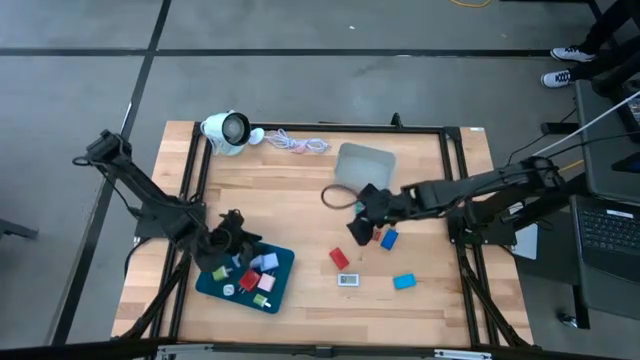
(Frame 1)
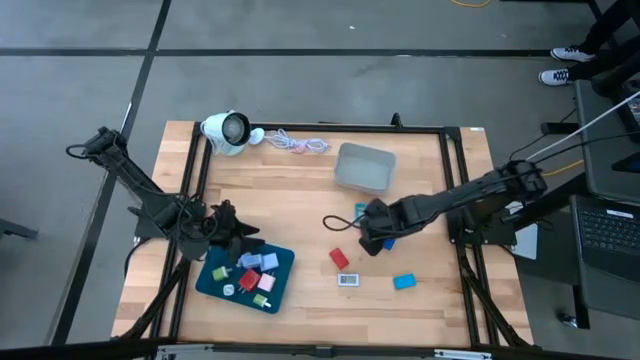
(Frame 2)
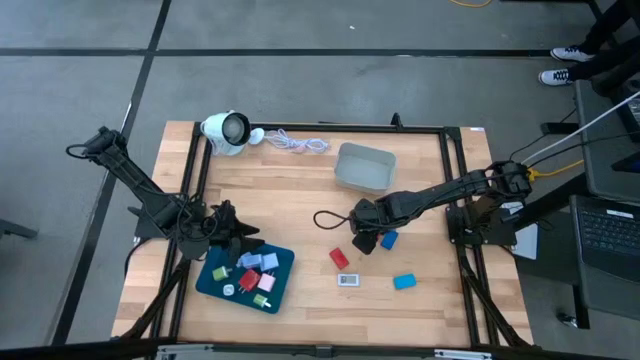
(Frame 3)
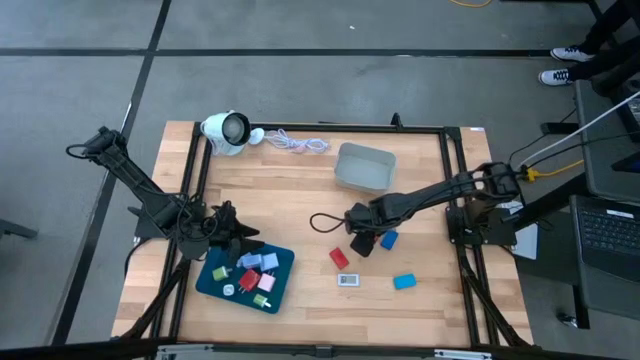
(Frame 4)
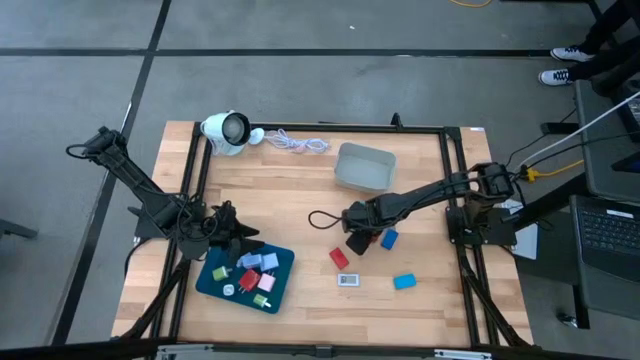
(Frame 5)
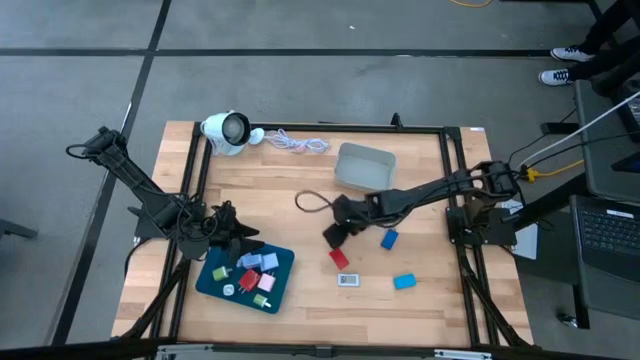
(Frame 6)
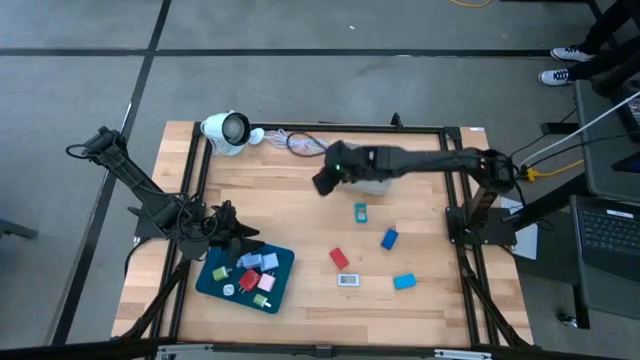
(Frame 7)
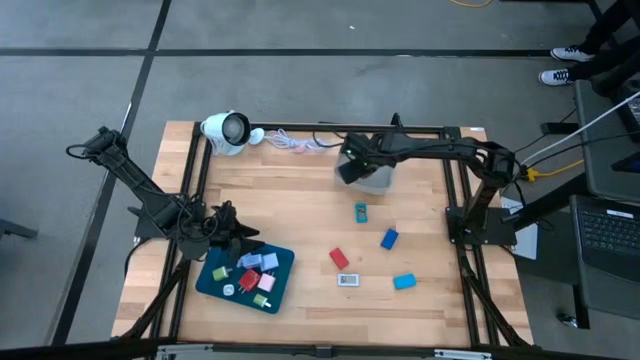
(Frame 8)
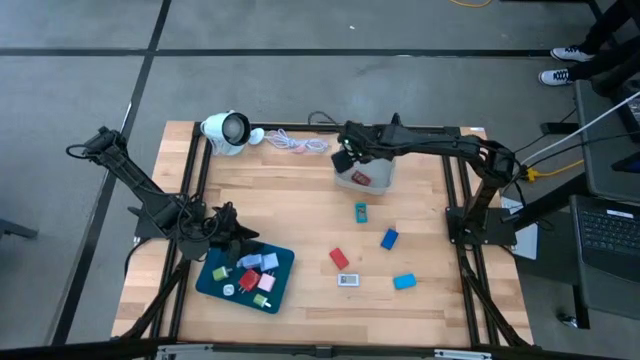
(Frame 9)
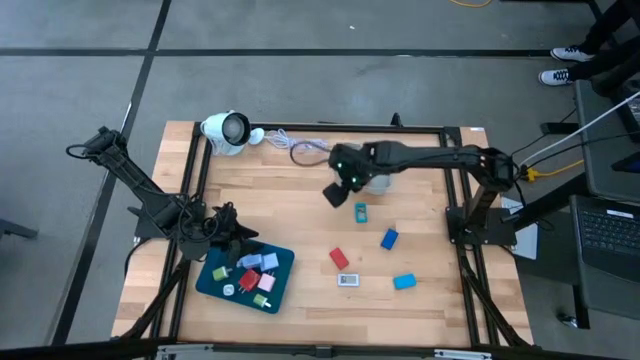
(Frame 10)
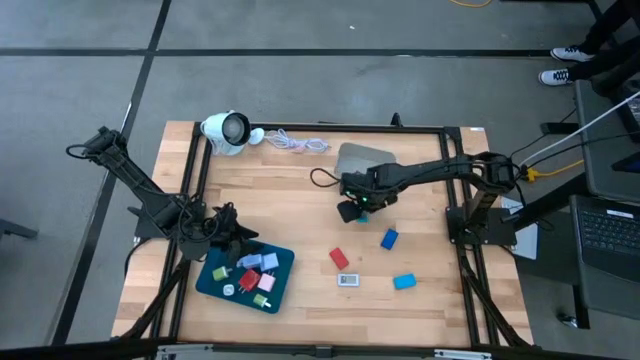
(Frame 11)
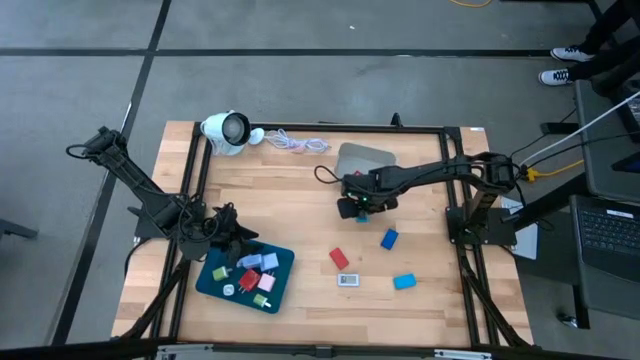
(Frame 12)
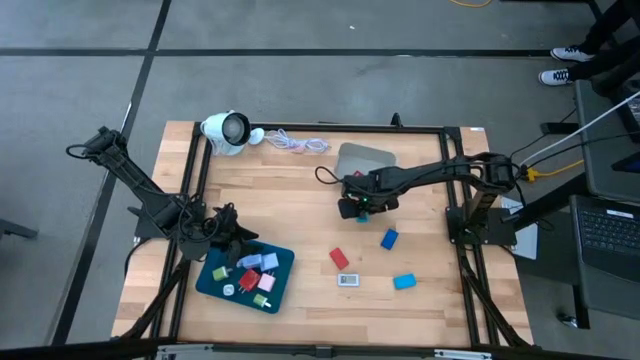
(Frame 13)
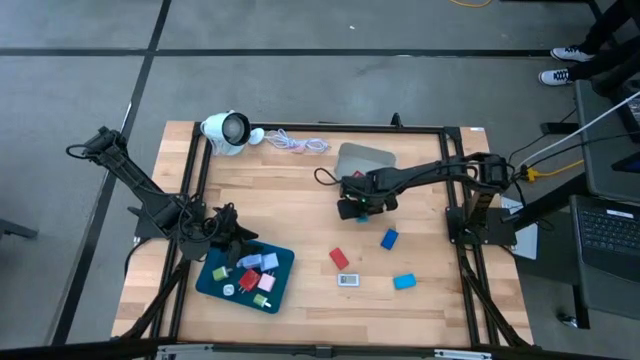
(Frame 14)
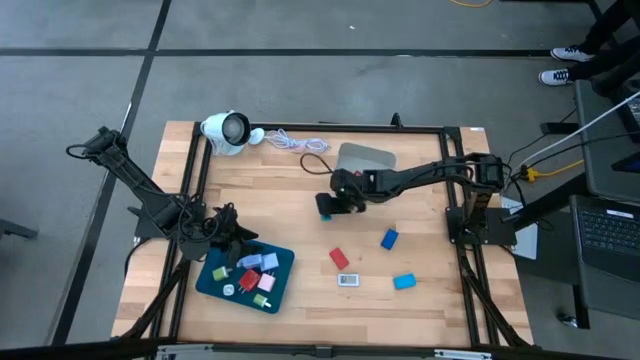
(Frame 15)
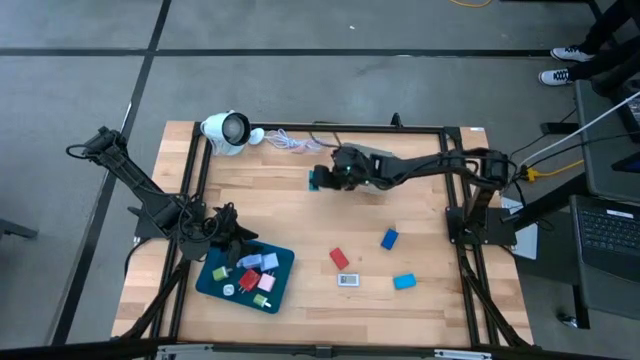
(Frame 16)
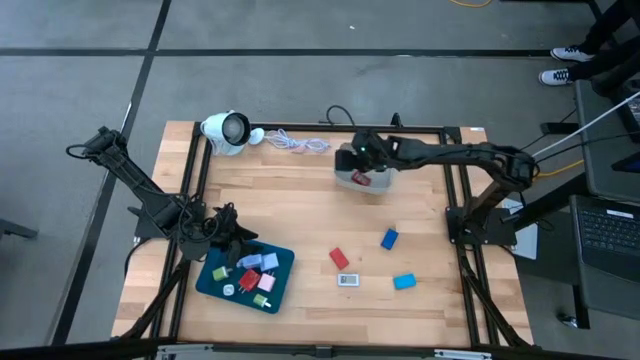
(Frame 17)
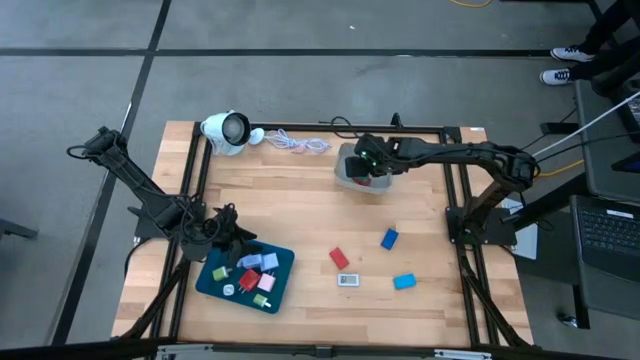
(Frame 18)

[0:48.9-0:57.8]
Task: Pick & Place Office items
Put the top red digital clock into the gray bin

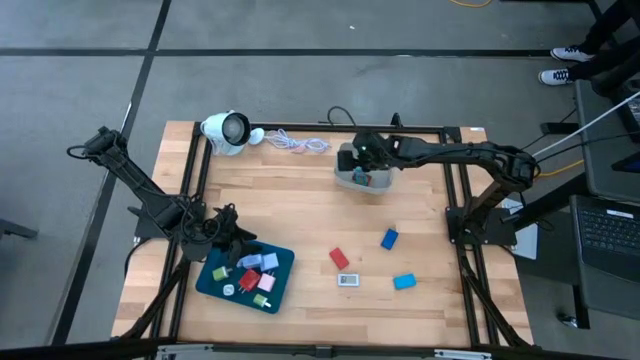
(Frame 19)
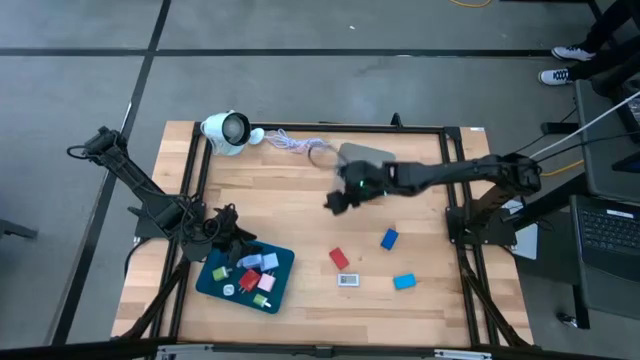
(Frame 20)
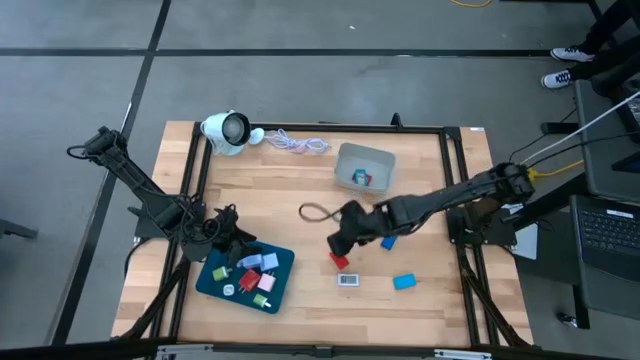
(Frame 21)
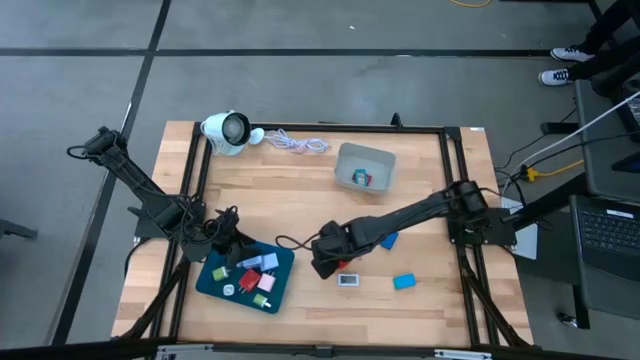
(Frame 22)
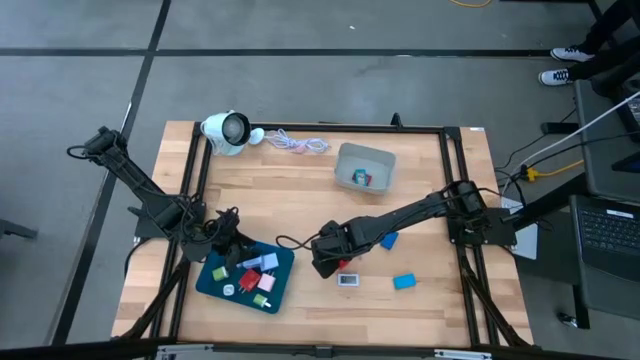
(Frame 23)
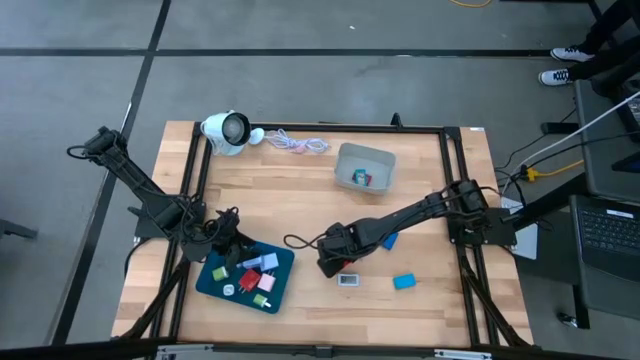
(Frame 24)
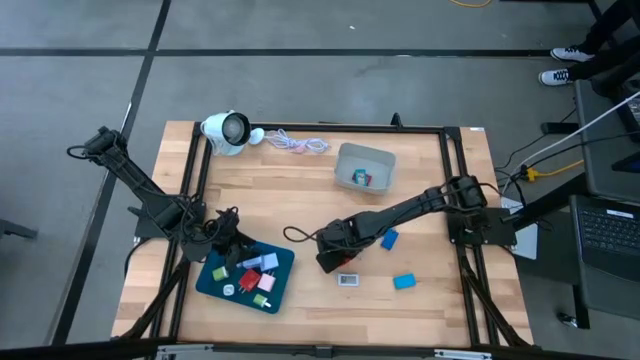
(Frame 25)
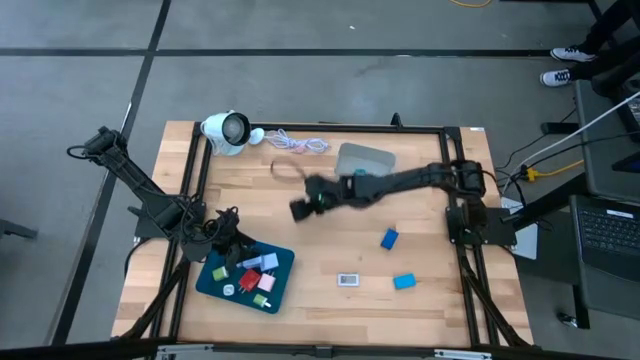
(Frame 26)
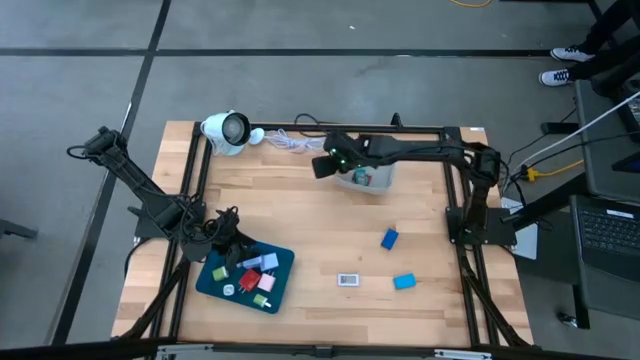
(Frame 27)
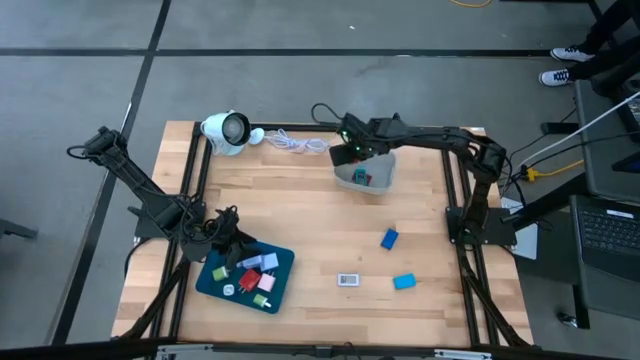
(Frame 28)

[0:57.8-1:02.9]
Put the red digital clock into the gray bin

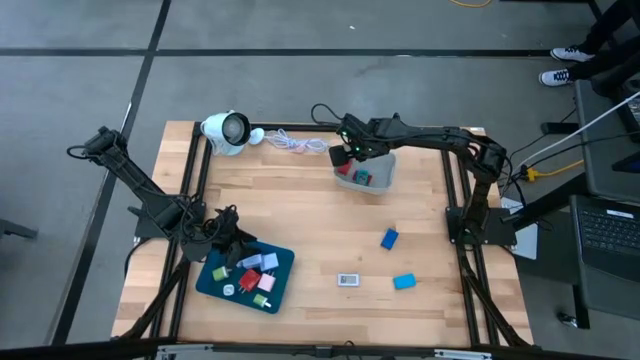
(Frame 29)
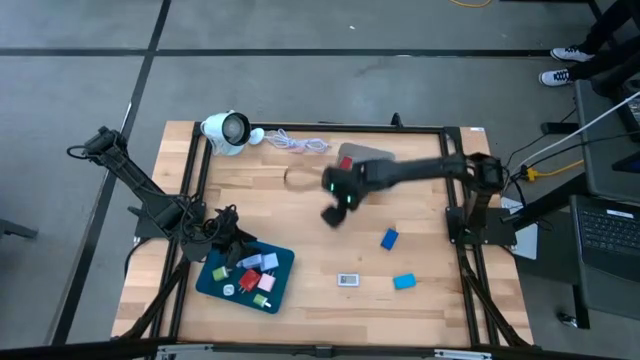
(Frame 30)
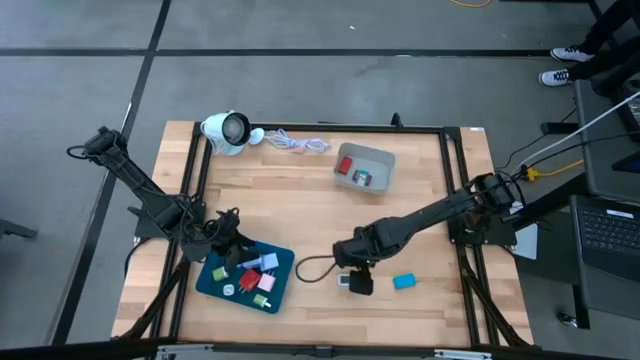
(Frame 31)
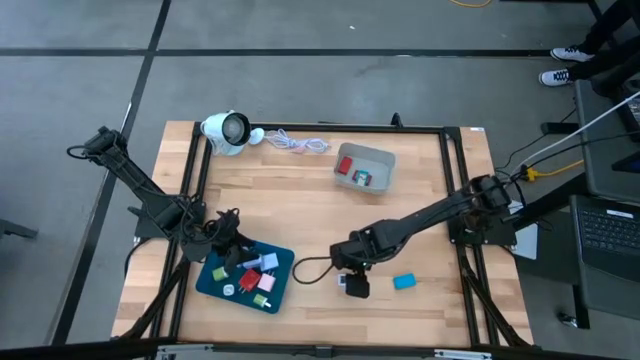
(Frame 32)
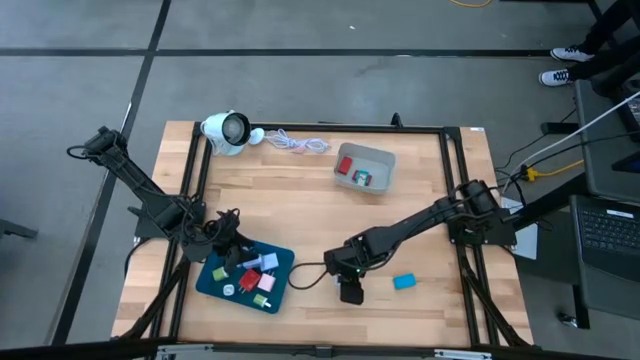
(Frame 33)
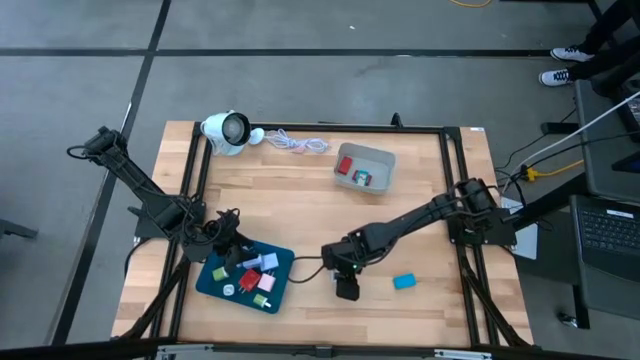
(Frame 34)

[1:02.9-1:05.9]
Put the white digital clock into the gray bin

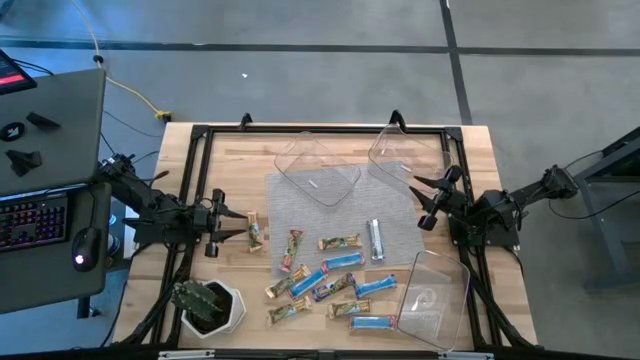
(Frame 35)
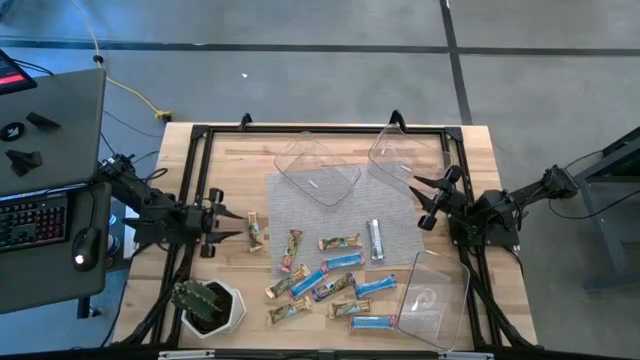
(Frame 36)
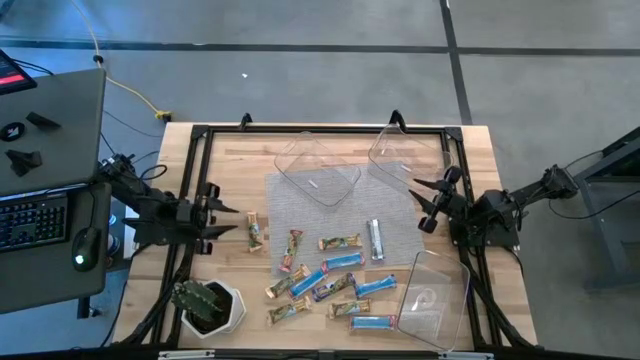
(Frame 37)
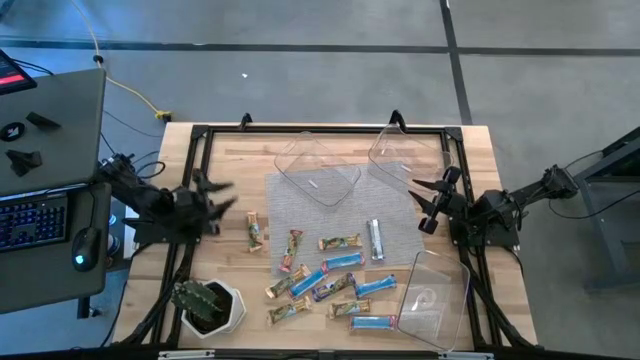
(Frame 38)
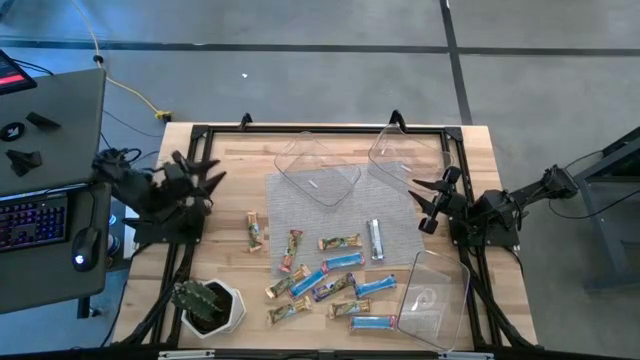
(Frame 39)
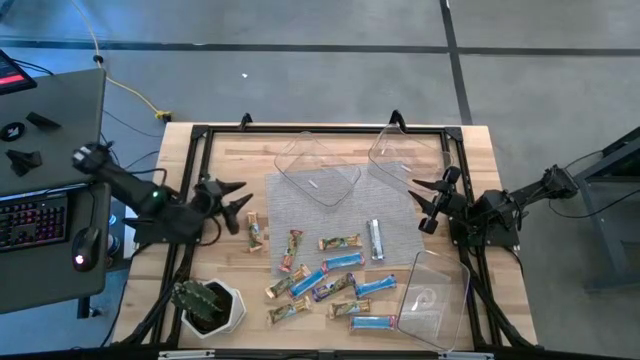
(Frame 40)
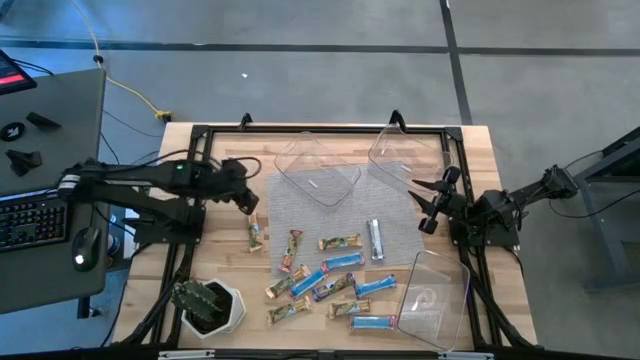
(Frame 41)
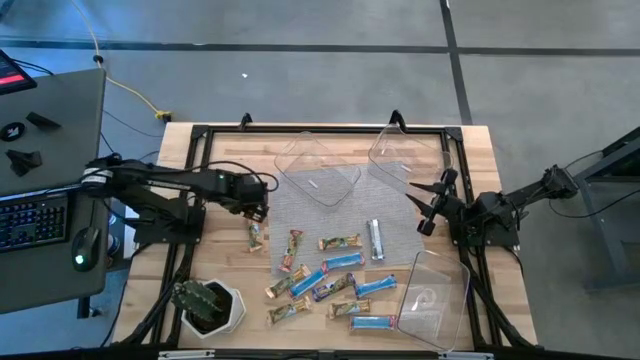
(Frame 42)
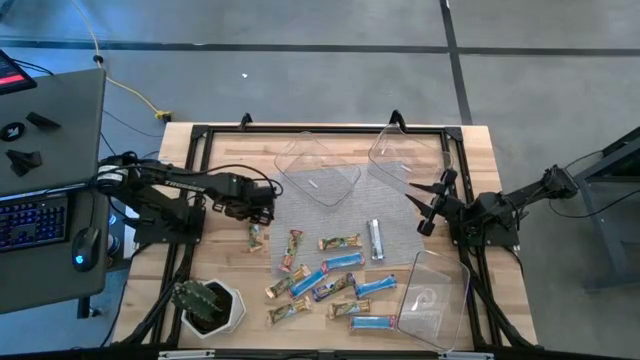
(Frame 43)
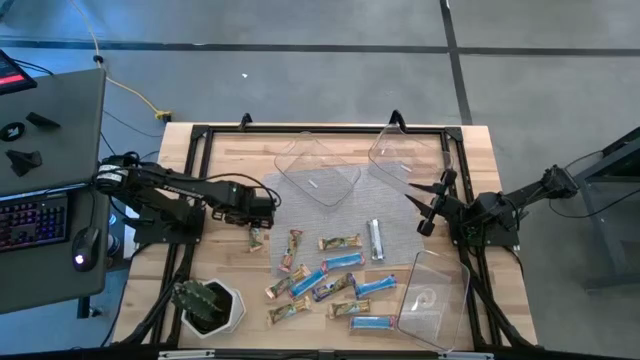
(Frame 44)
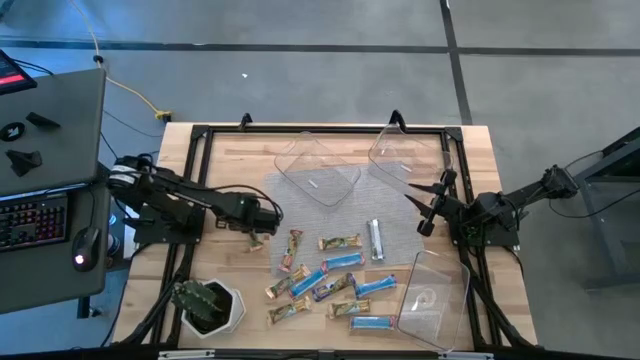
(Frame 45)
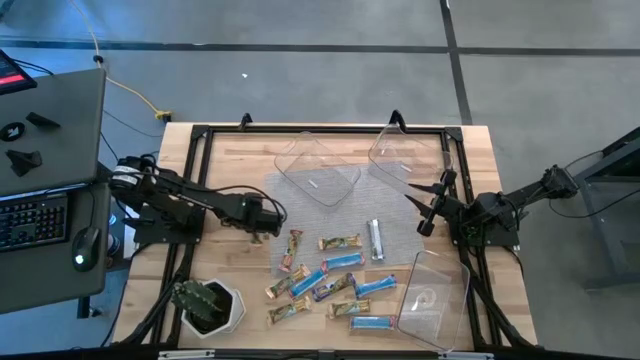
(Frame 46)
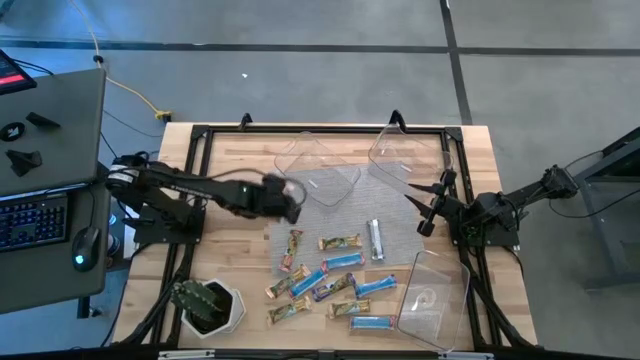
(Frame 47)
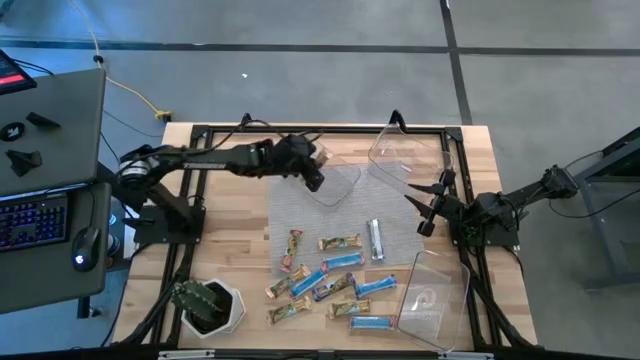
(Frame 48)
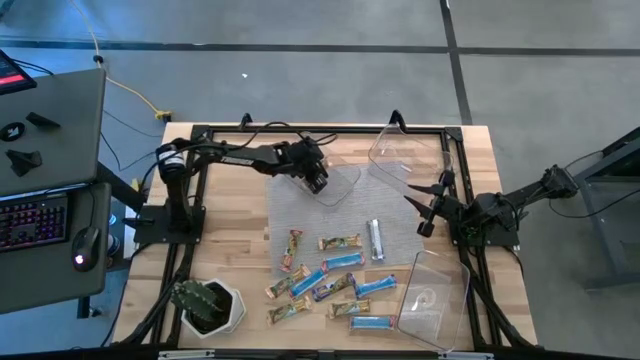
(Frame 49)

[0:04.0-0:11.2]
Task: Pick and place Granola Bars by type
Put the yellow granola bar into the top middle transparent bin
